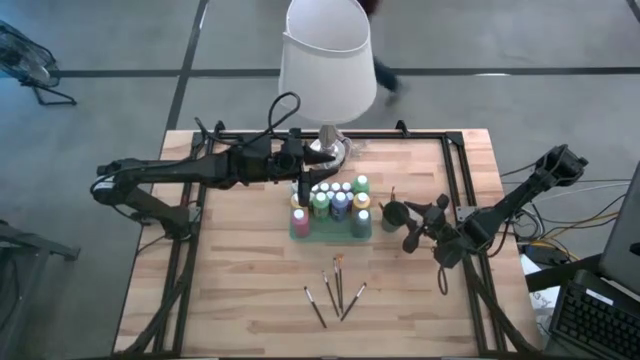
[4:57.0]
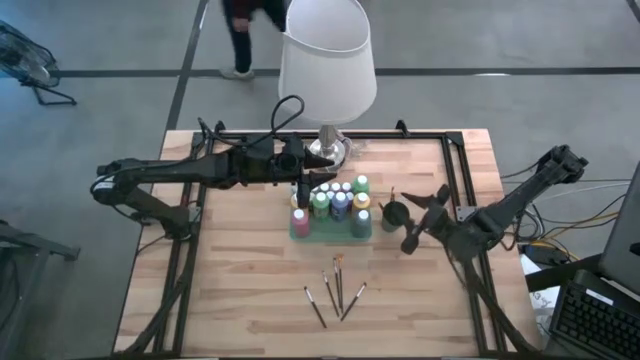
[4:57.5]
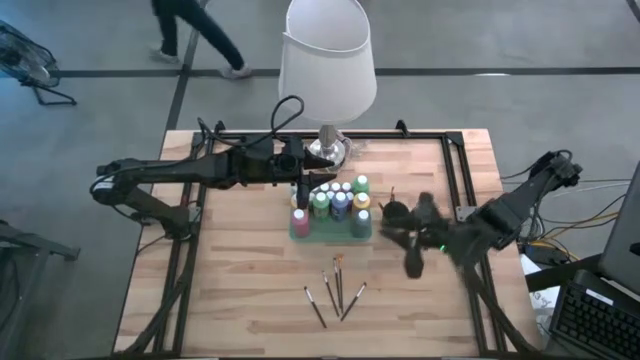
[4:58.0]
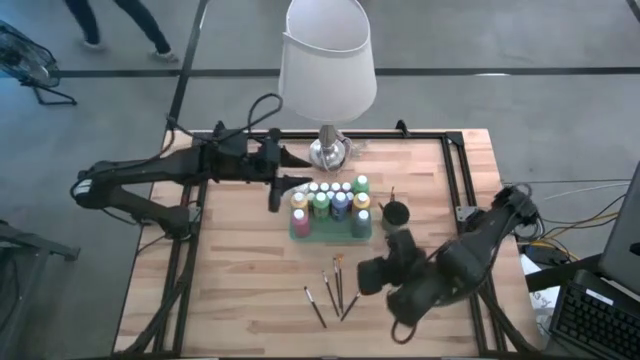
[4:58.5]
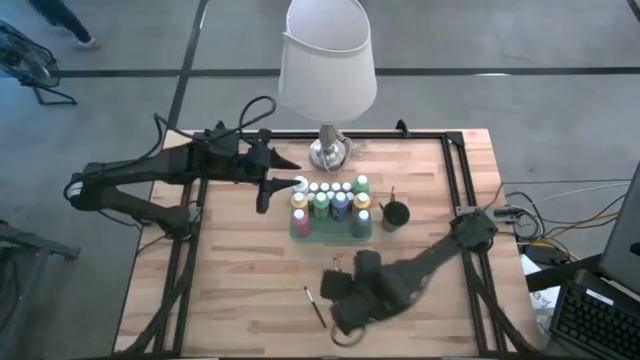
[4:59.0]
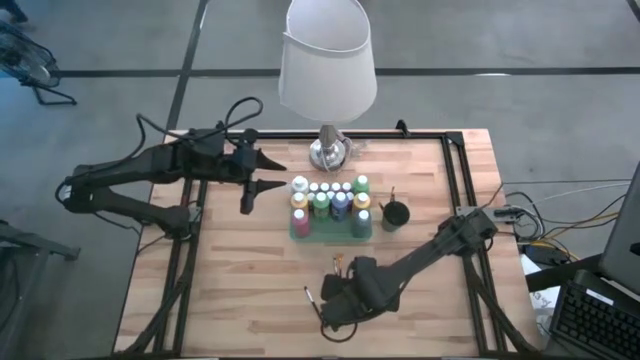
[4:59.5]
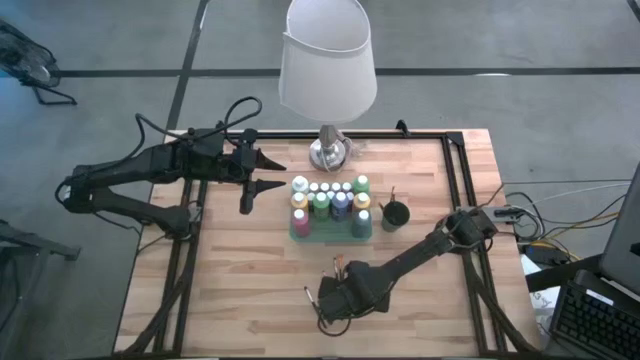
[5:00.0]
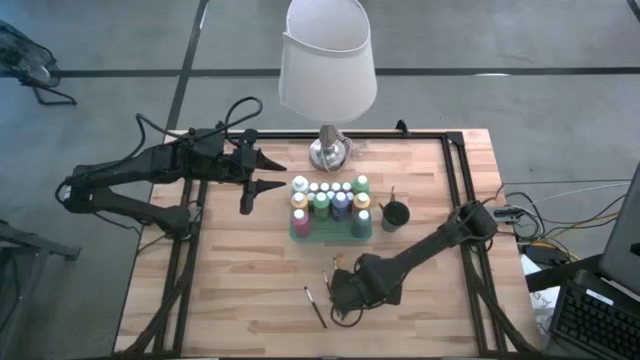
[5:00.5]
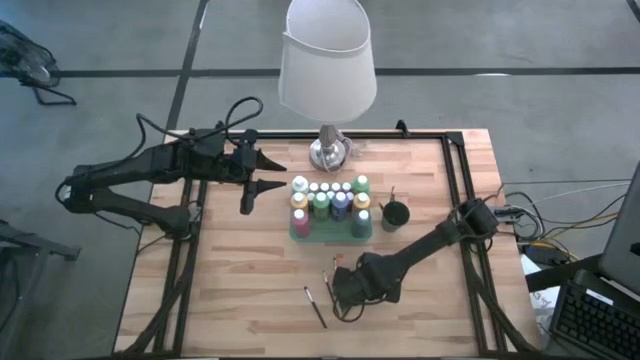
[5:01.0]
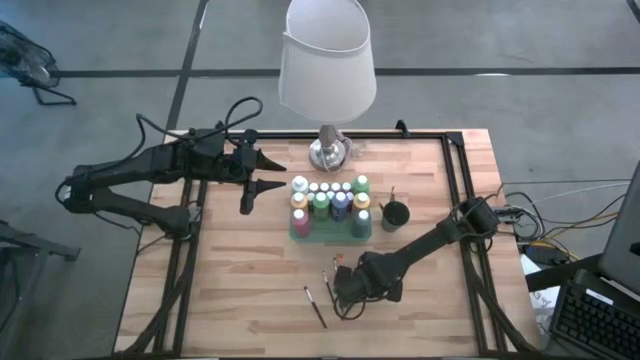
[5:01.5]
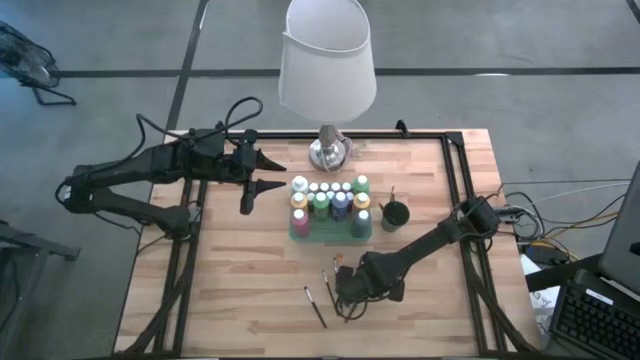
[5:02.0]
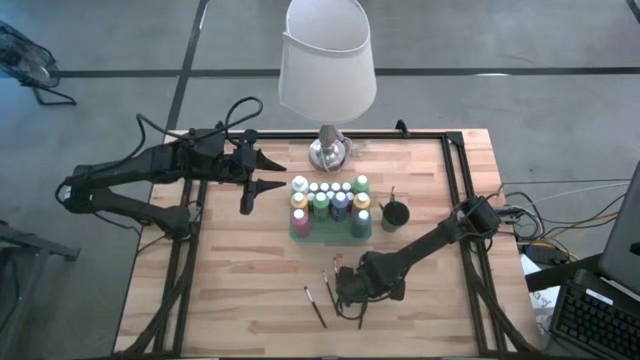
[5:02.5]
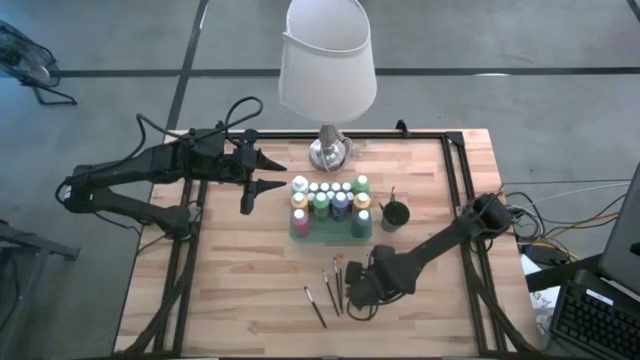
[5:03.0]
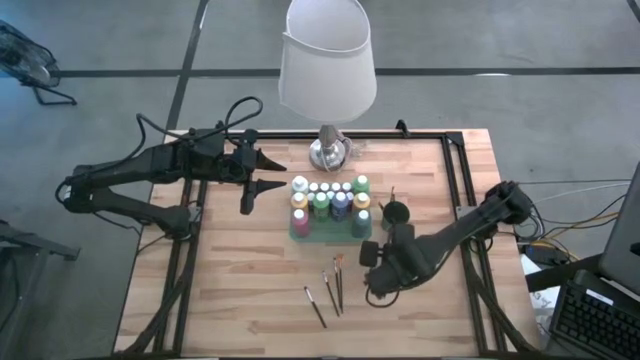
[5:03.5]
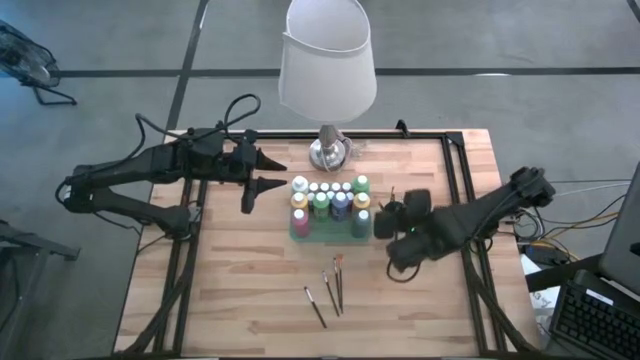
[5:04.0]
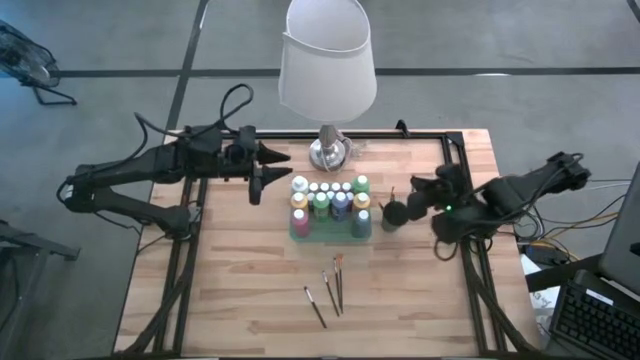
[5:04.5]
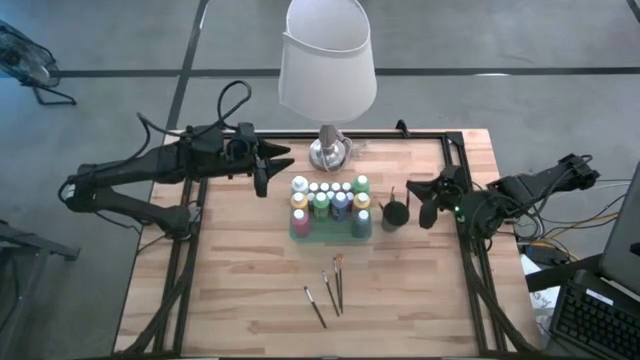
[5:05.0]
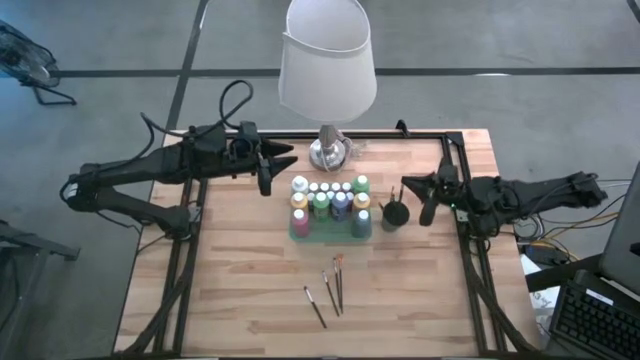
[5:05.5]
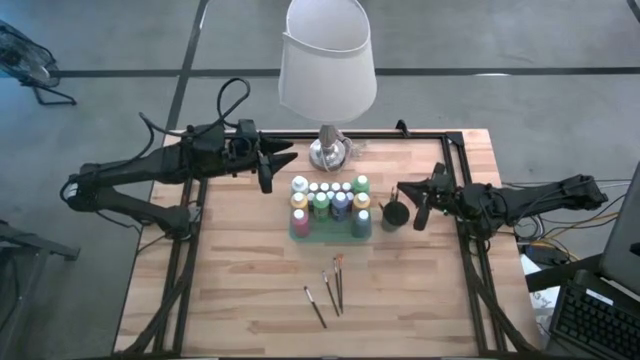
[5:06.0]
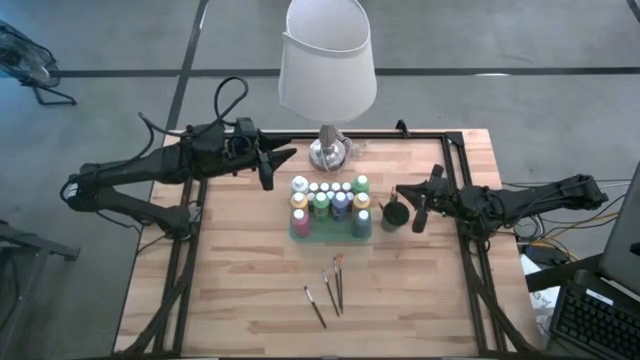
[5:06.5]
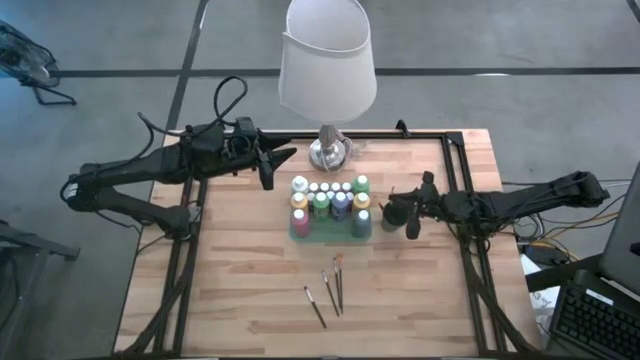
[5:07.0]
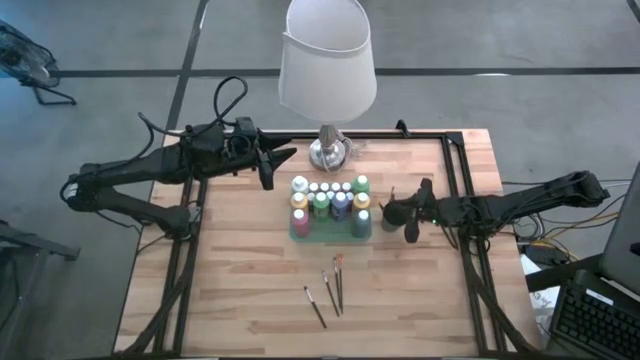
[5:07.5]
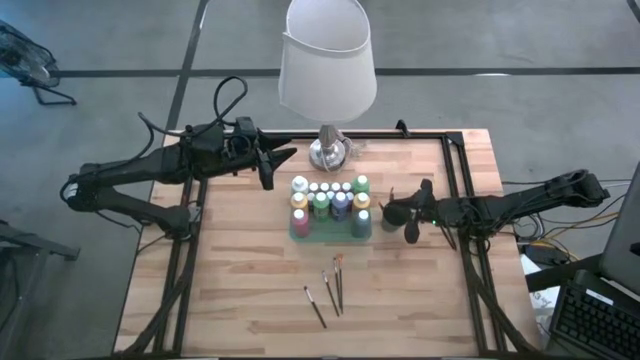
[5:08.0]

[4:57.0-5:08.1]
Task: Pick & Place Paint Supplies
Put the black paint brush into the black cup

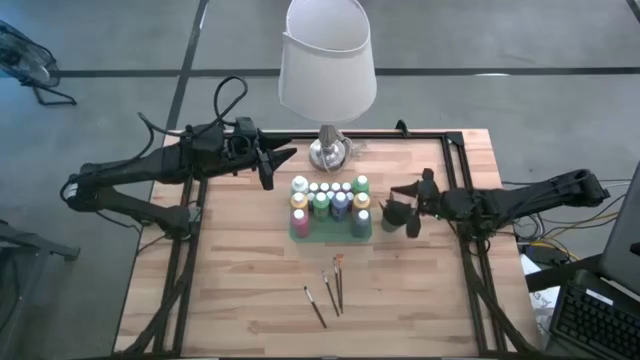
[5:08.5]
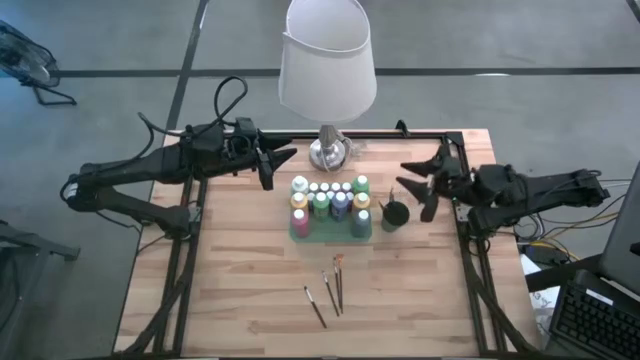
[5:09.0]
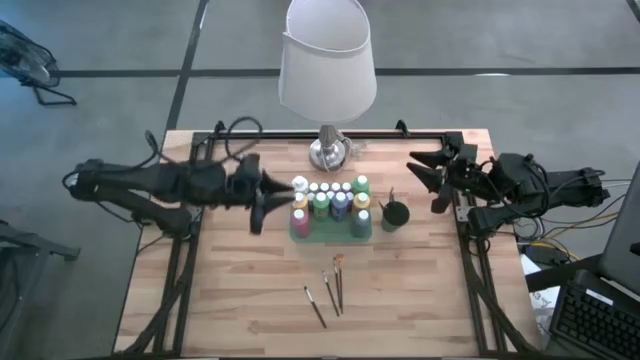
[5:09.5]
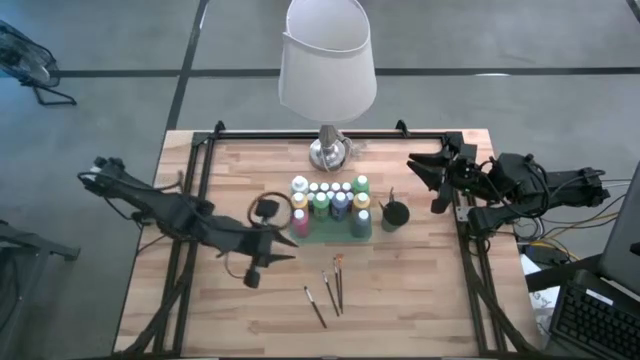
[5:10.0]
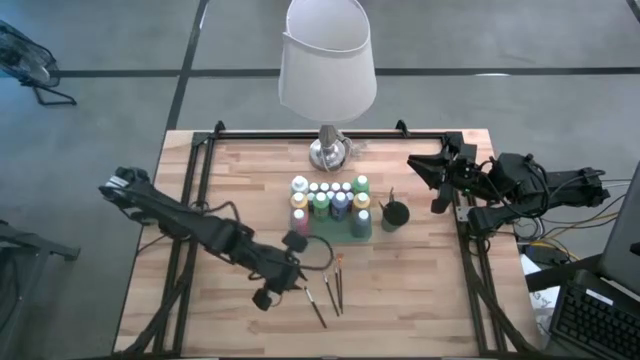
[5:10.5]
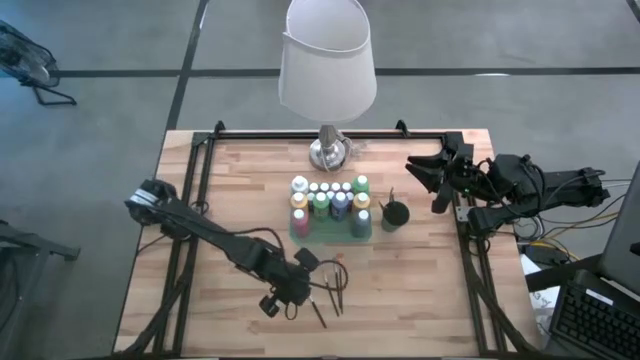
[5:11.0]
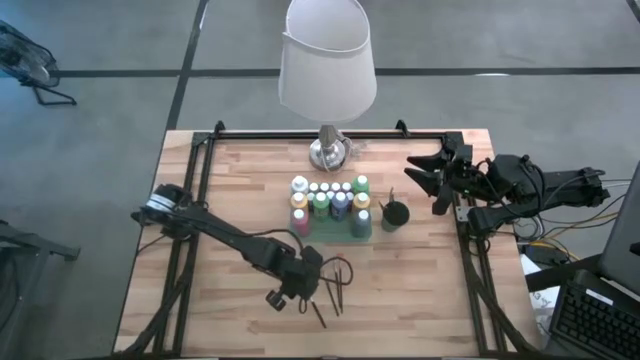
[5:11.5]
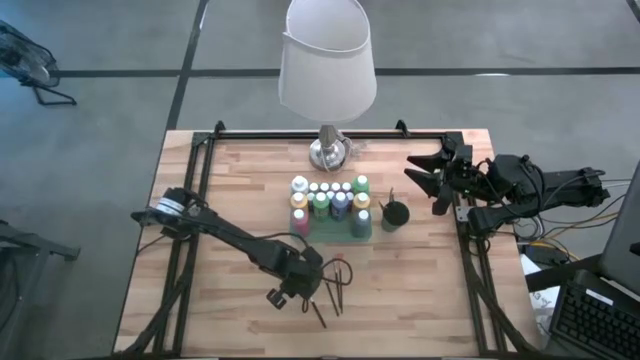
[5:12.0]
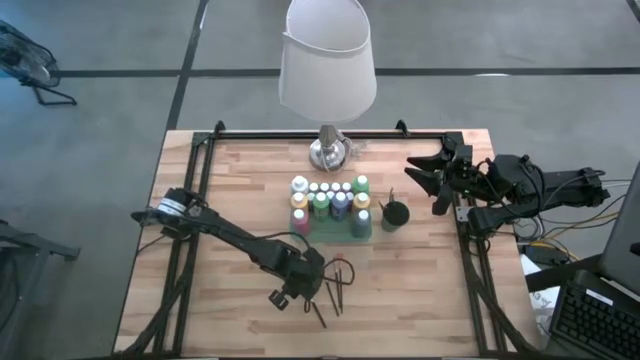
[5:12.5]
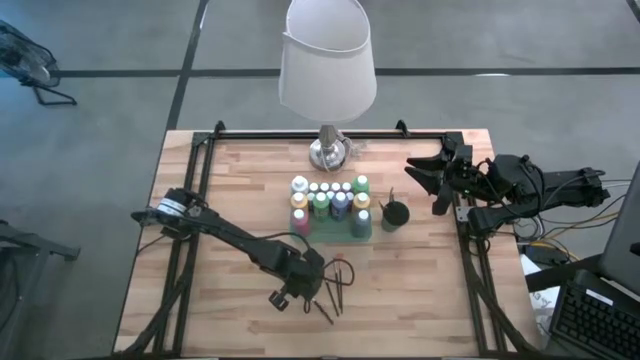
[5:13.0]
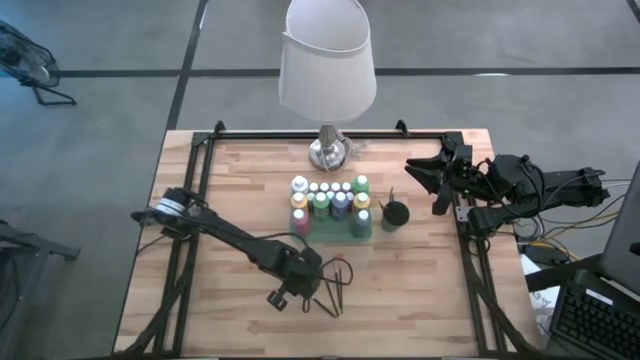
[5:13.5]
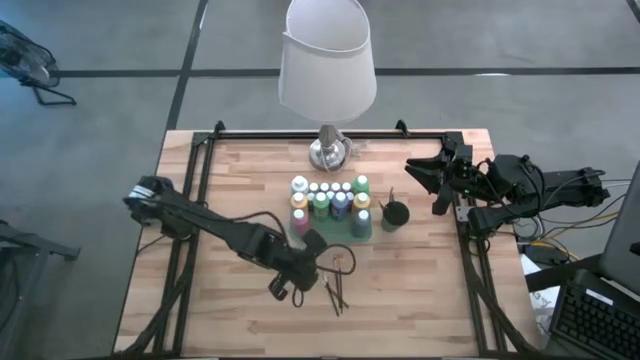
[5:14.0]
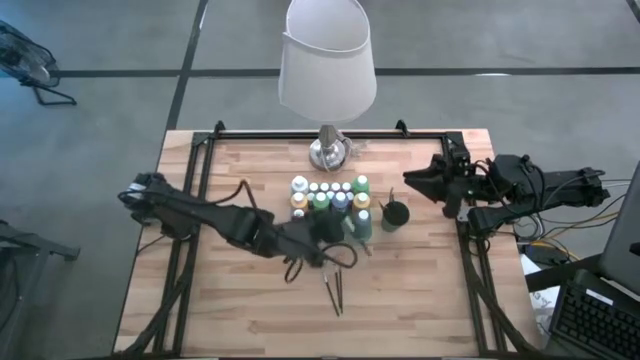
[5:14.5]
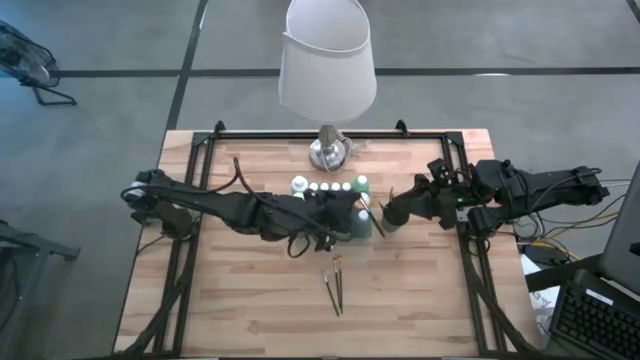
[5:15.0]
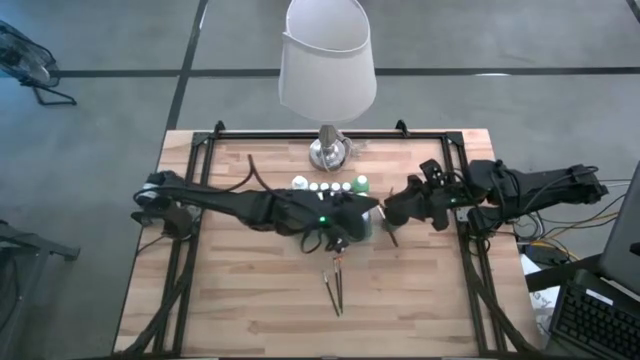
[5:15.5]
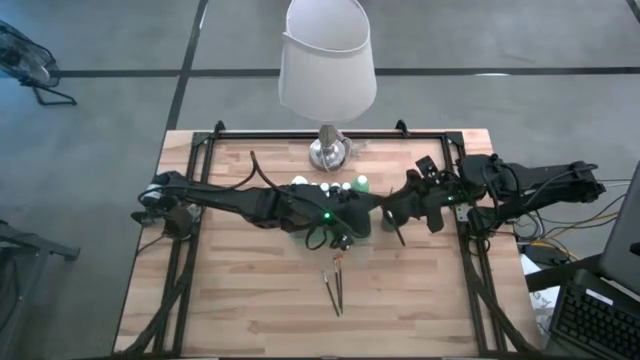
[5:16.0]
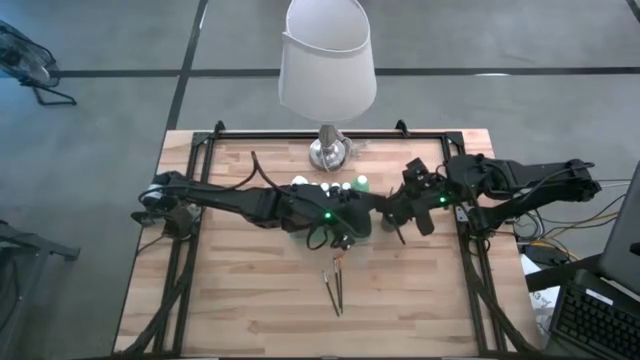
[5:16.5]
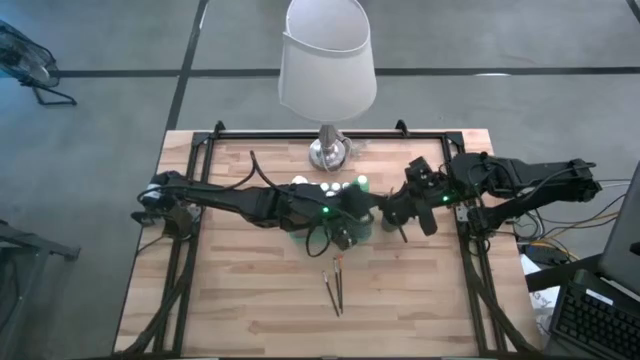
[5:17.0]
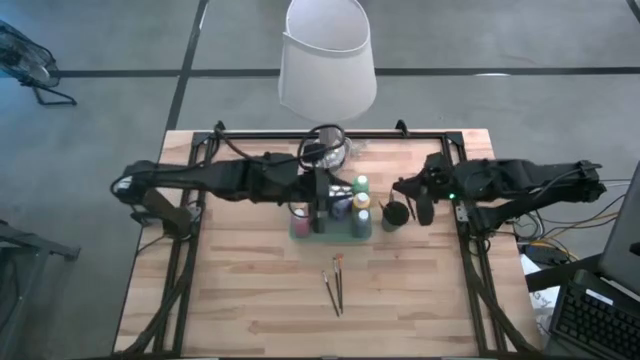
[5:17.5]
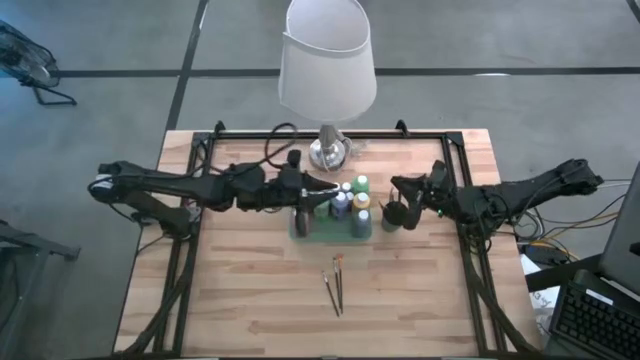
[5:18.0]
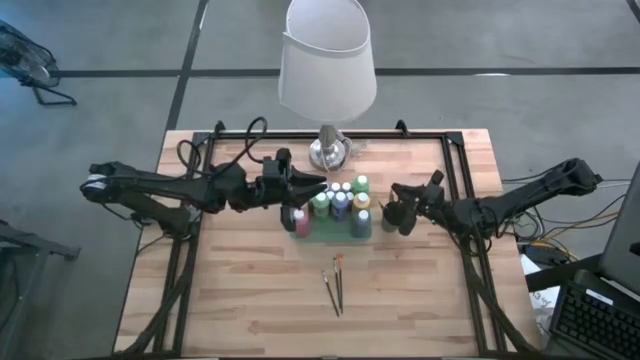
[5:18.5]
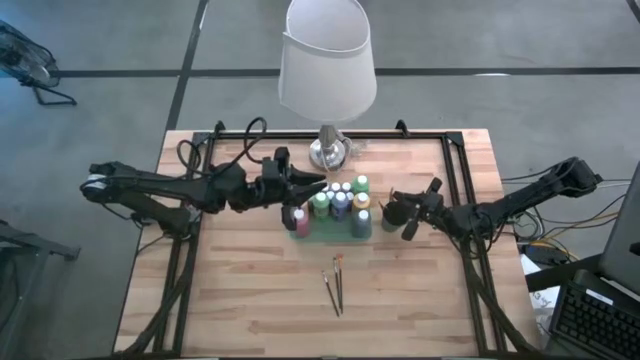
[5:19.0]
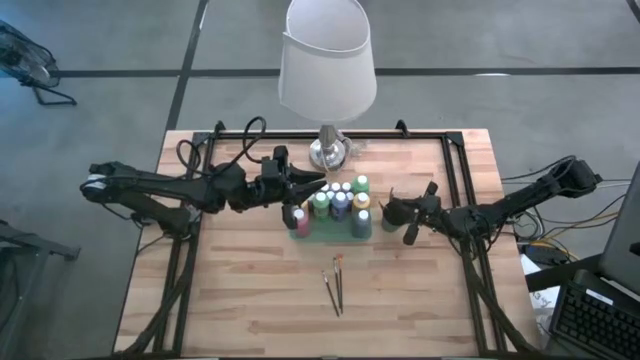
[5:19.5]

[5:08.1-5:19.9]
Put the black paint brush into the black cup
